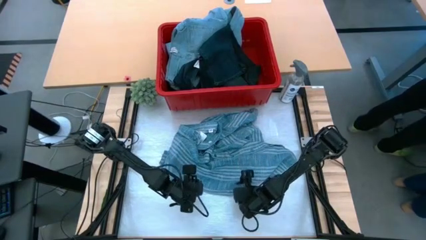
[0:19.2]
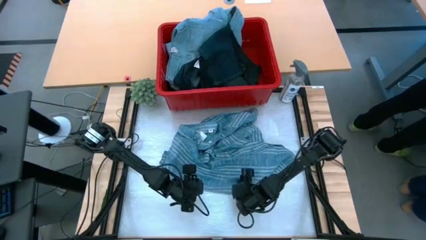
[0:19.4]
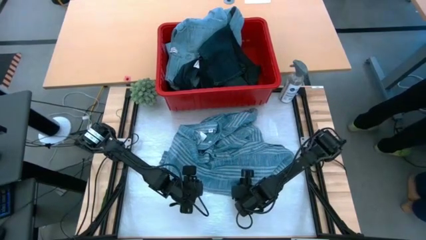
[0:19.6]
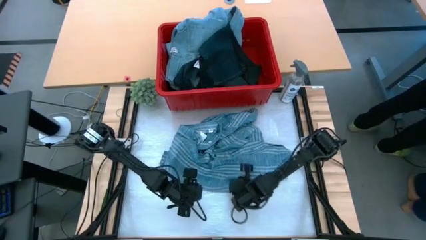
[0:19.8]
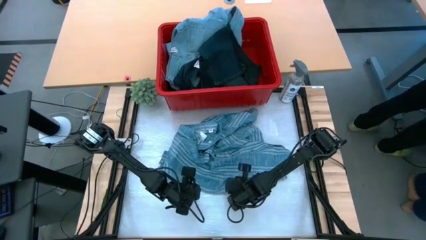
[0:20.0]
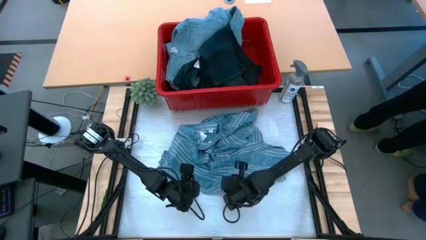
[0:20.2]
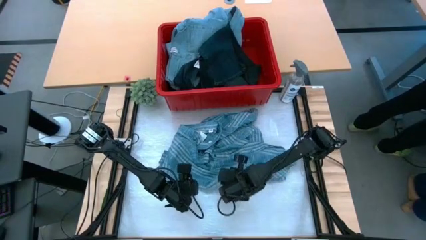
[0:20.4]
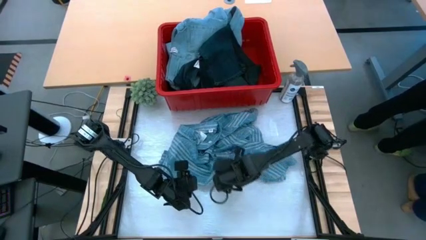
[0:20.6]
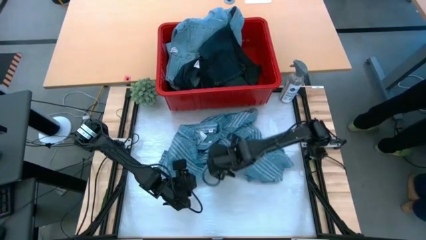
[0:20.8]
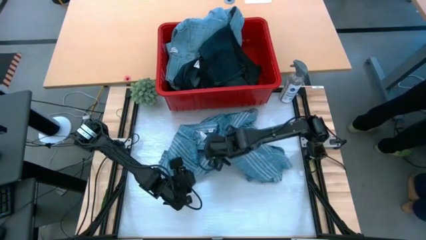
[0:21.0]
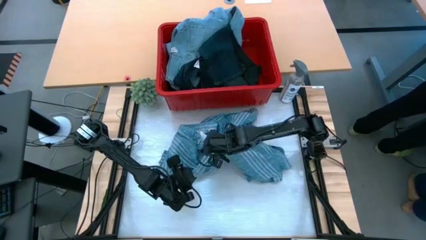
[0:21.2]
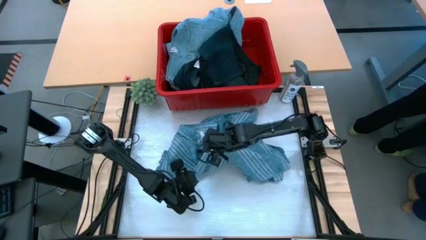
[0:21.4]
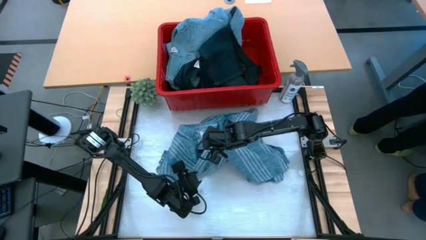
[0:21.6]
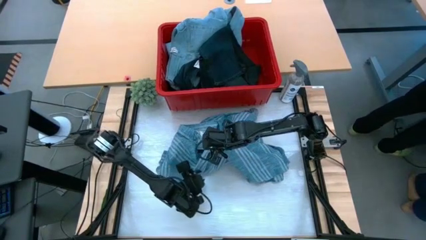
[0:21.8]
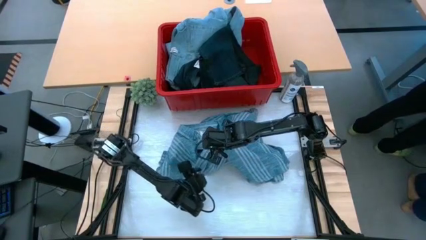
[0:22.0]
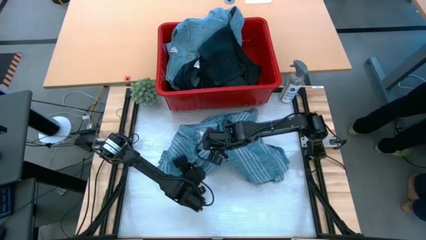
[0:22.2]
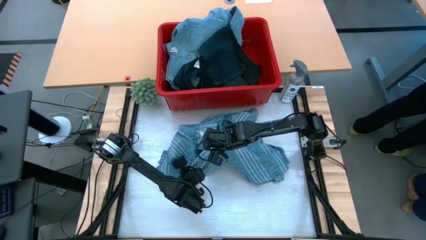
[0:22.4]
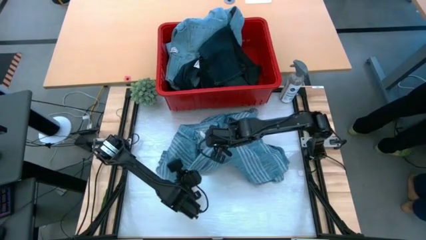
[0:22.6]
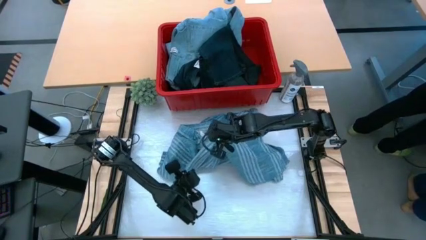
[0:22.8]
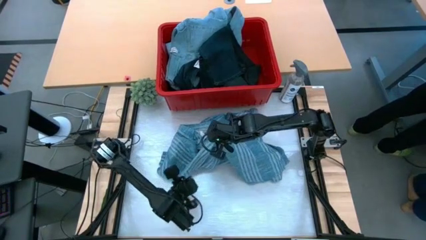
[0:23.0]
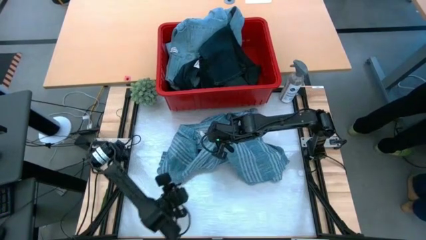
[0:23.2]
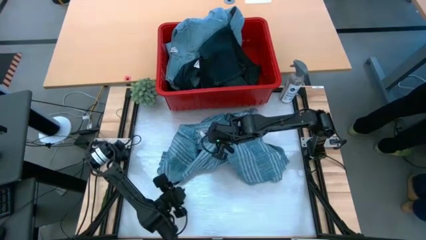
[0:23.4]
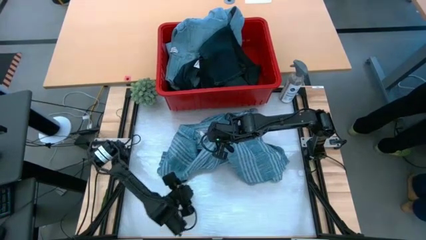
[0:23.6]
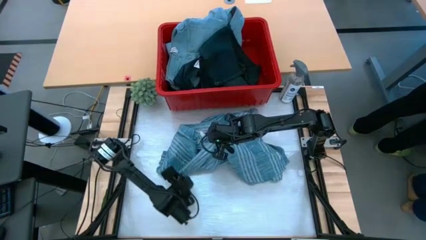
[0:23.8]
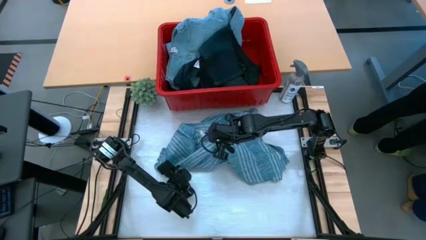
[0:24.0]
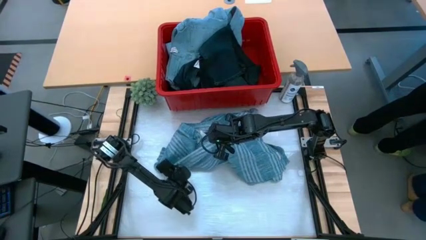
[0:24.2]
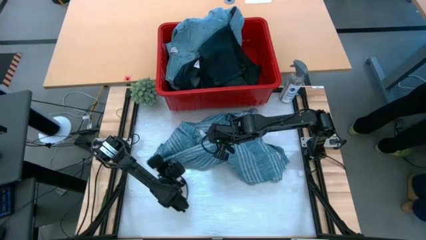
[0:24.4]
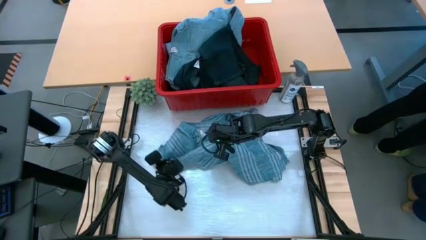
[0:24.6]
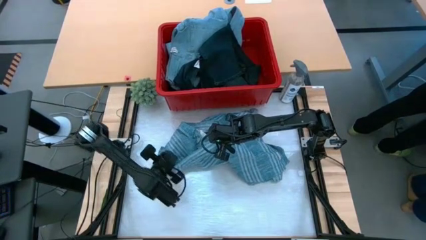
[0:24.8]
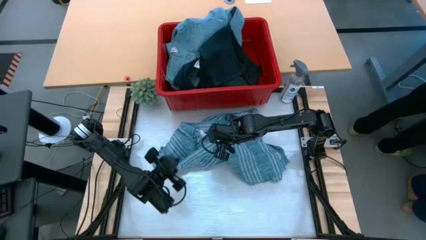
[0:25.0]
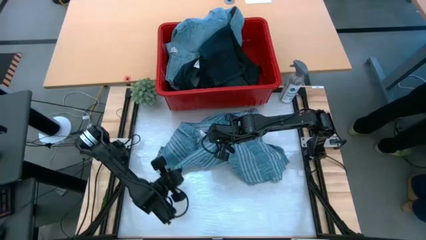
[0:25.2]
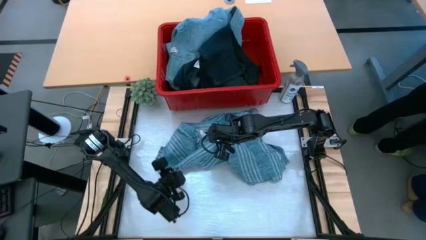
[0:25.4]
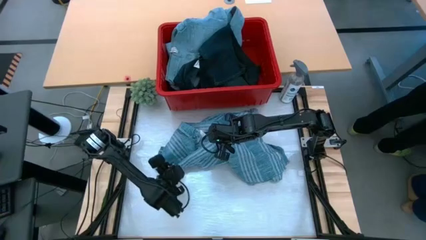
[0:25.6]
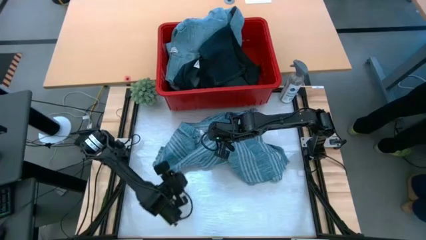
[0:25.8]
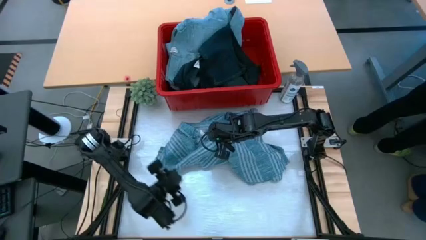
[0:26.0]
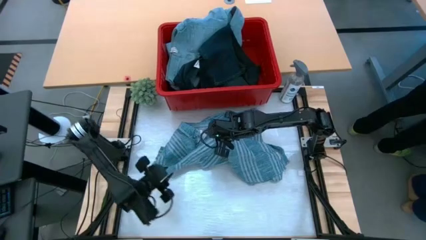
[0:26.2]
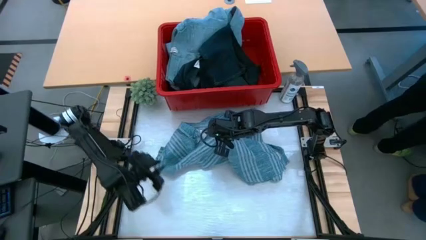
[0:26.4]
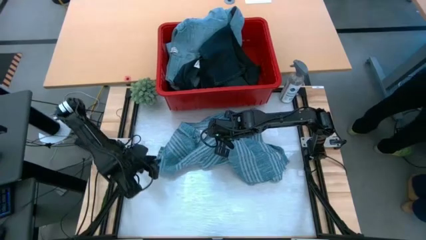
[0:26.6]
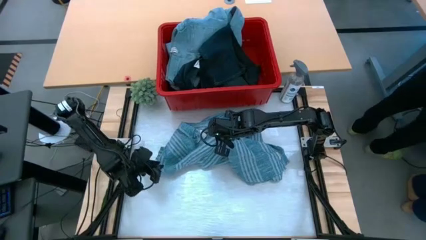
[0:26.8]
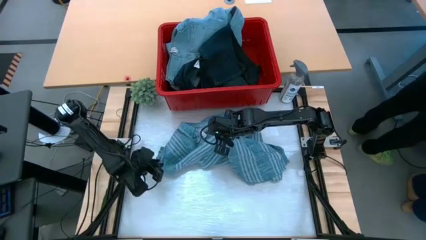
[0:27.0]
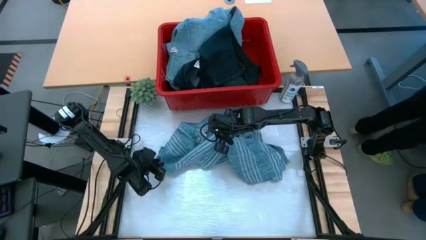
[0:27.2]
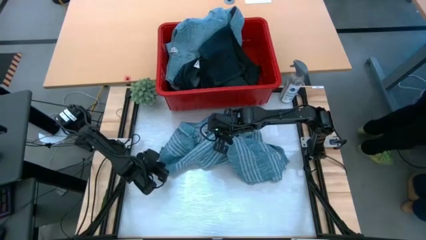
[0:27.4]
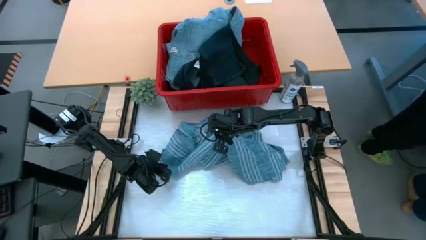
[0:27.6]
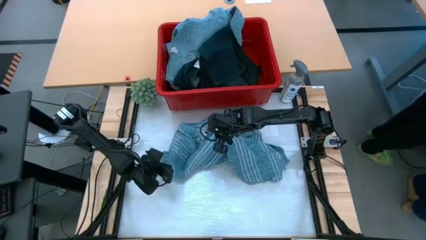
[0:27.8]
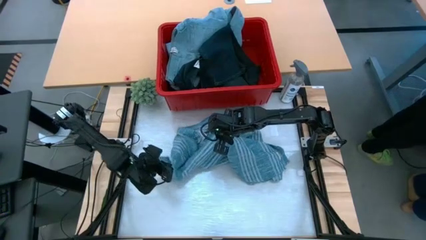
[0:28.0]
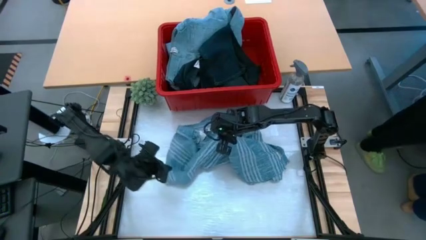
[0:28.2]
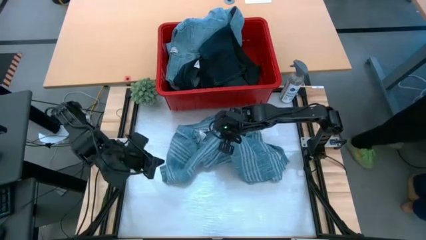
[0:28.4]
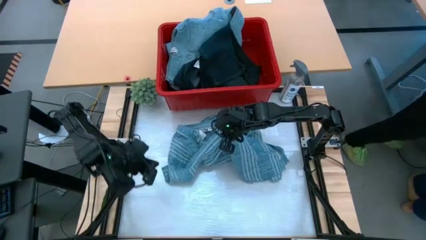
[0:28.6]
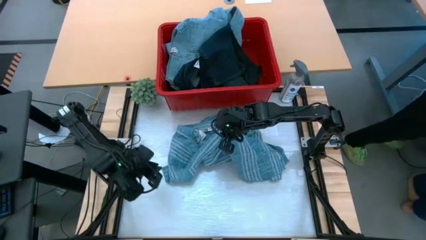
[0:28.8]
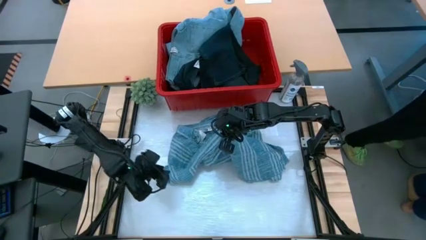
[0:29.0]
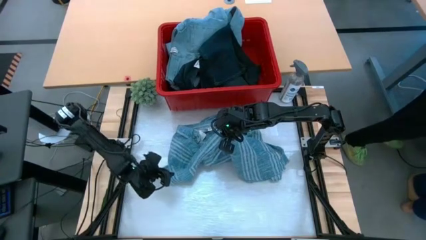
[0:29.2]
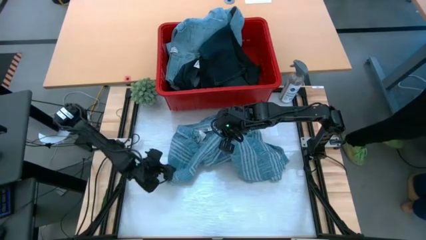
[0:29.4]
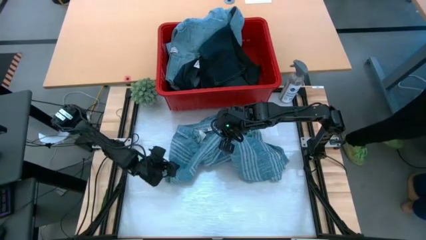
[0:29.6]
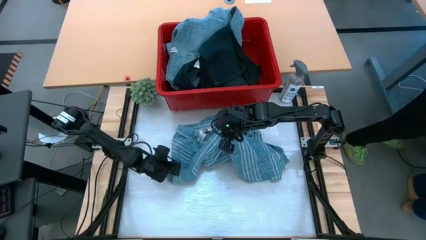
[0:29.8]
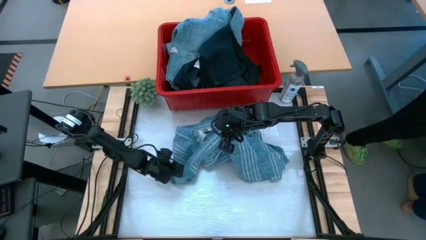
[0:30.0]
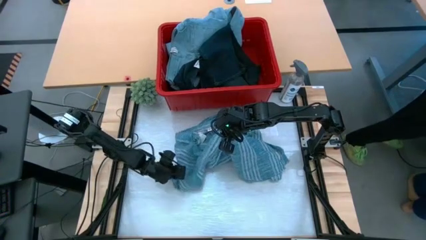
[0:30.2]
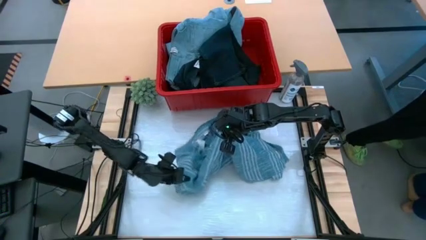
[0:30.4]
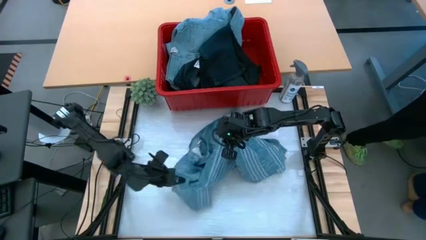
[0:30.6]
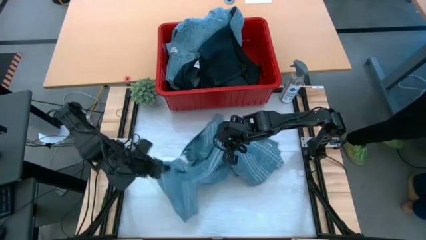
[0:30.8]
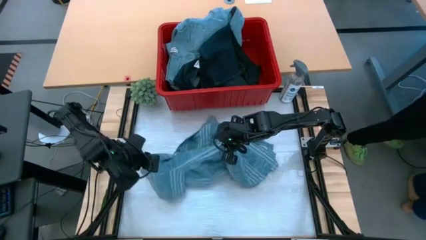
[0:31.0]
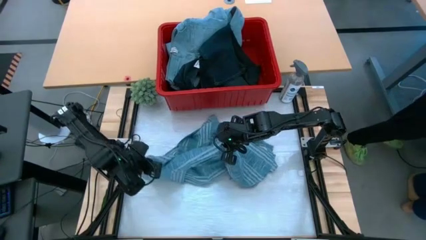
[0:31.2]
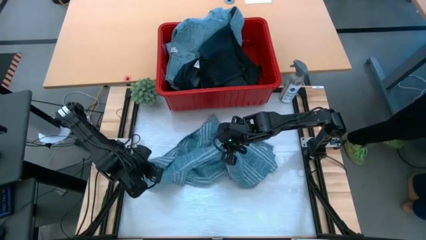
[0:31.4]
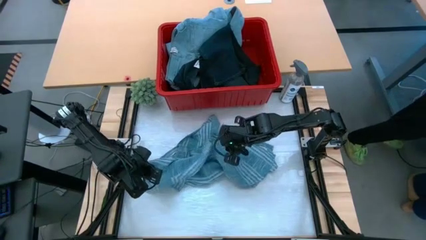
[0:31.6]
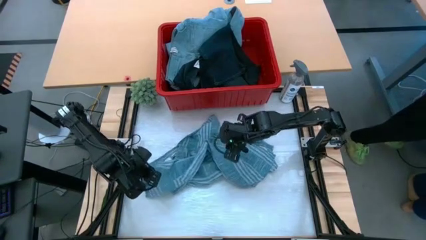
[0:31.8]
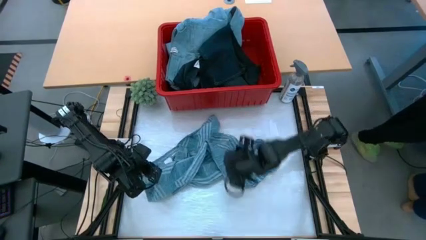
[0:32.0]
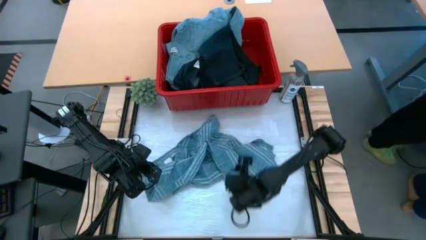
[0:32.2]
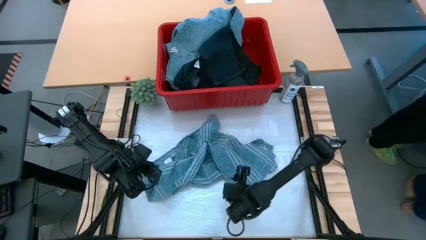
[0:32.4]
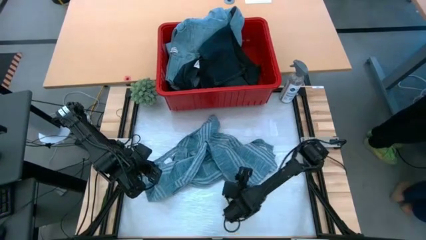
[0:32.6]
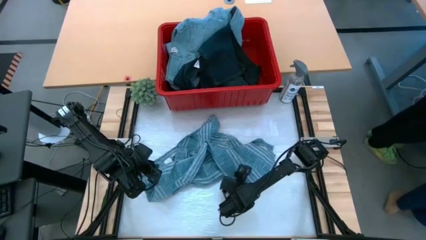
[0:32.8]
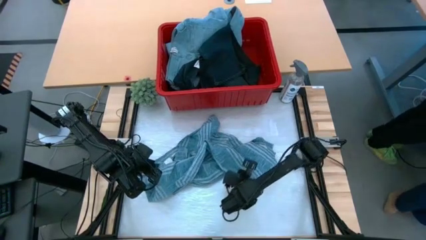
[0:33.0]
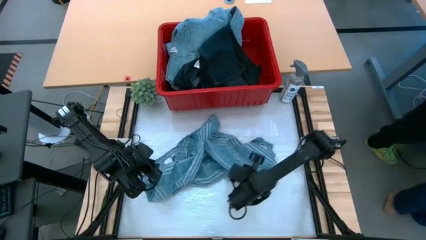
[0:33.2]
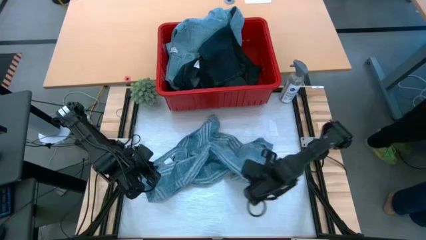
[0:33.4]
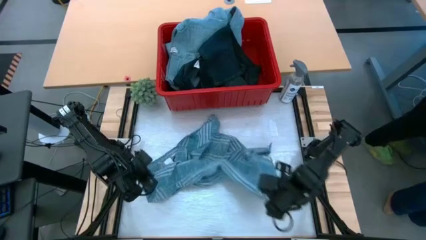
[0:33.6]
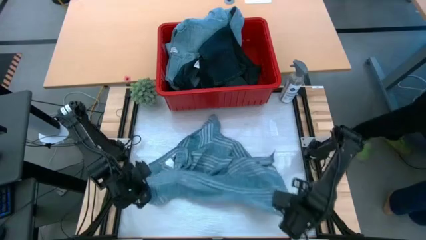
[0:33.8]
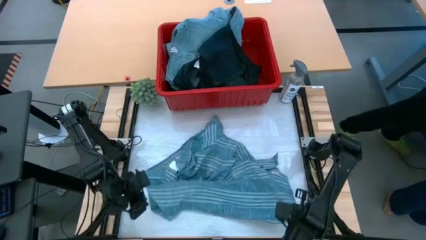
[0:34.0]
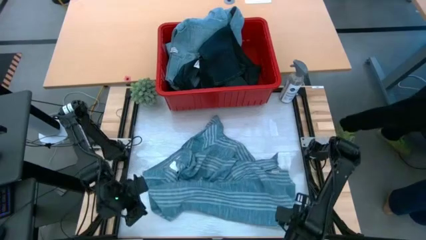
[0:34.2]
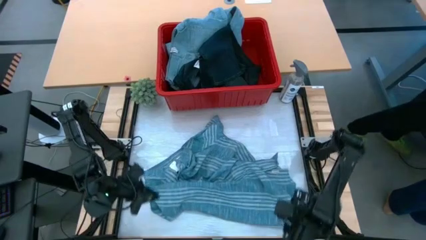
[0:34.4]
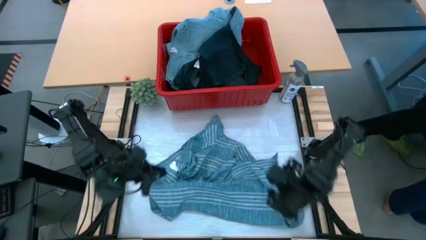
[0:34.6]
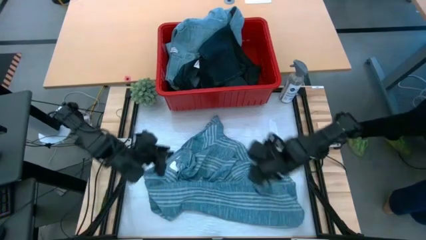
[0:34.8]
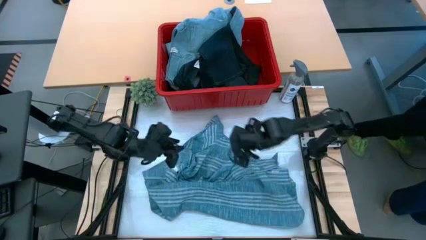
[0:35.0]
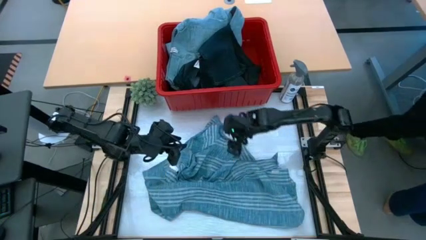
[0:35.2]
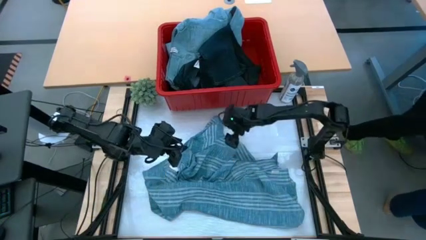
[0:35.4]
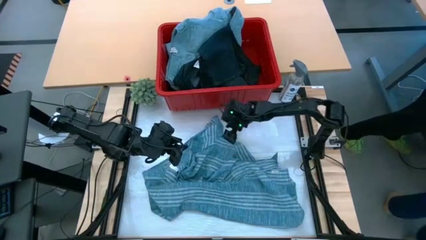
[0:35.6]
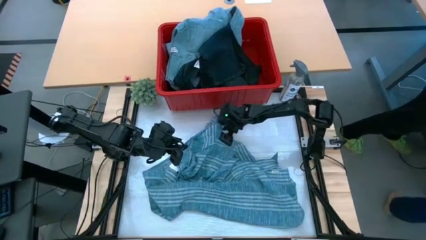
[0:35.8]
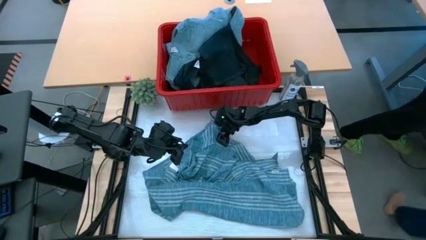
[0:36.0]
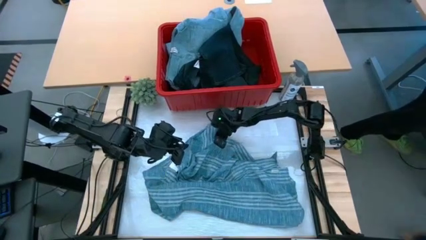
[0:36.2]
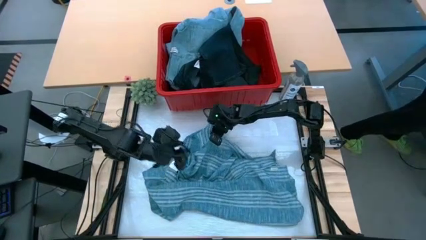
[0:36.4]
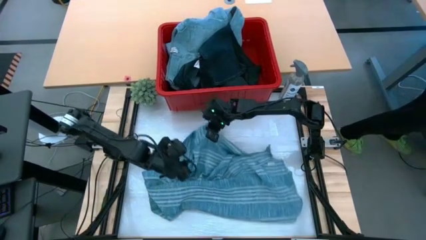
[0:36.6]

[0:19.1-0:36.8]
Task: Fold Laundry from Bin
Fold the blue polo shirt
